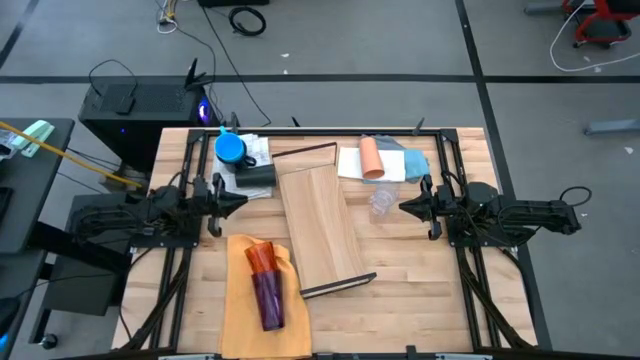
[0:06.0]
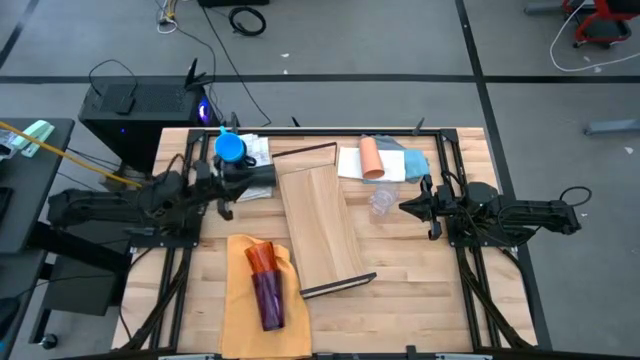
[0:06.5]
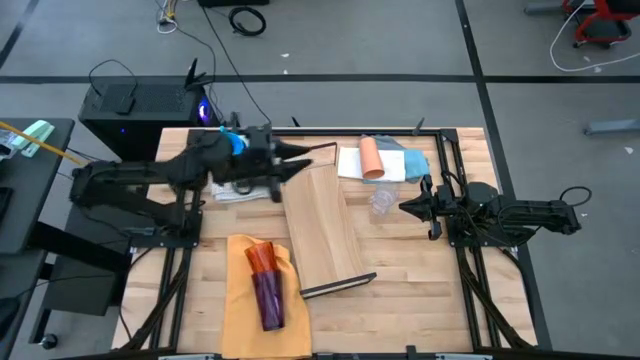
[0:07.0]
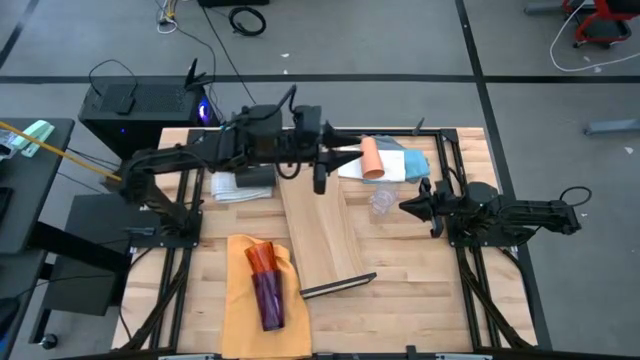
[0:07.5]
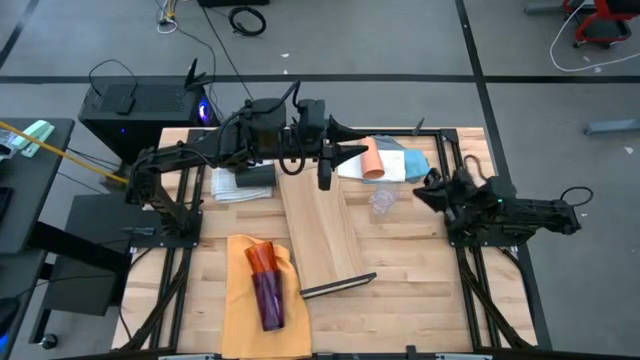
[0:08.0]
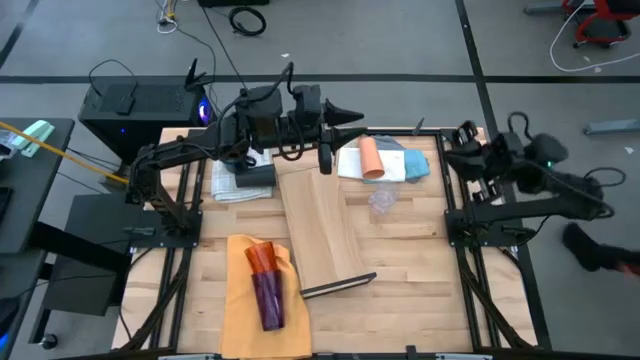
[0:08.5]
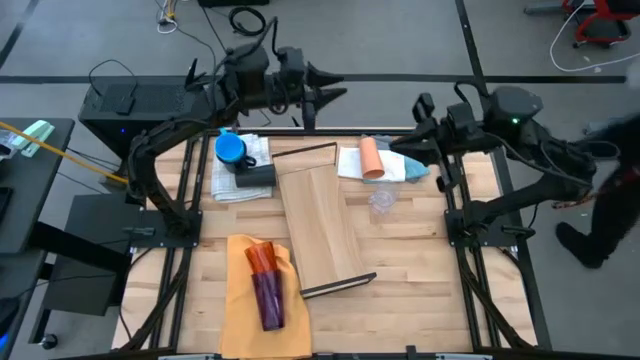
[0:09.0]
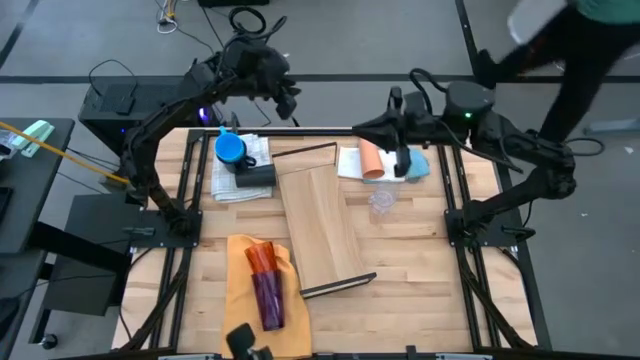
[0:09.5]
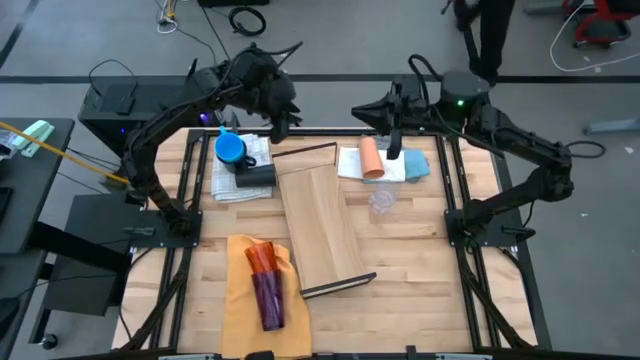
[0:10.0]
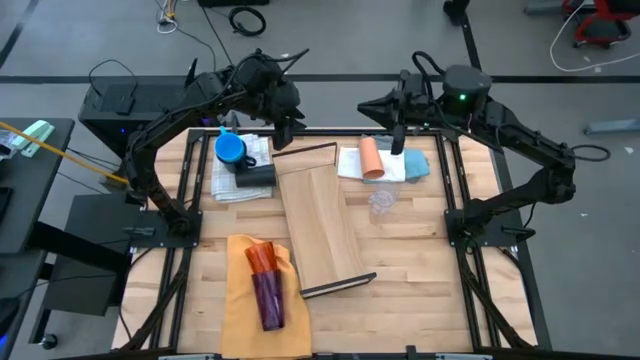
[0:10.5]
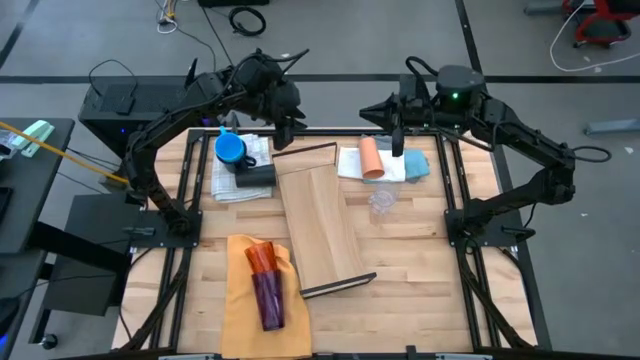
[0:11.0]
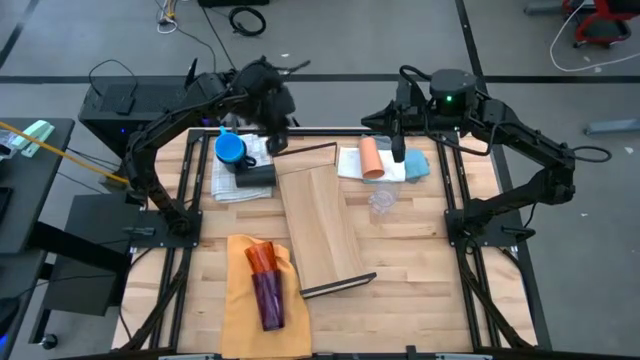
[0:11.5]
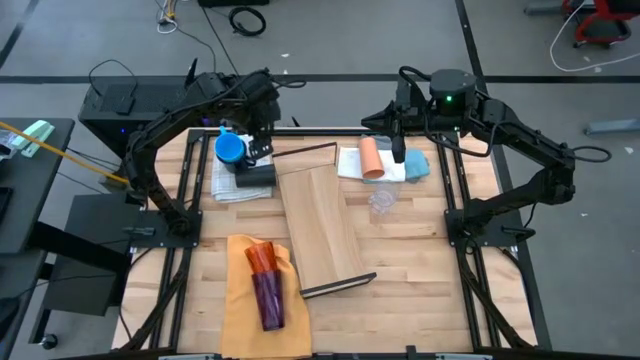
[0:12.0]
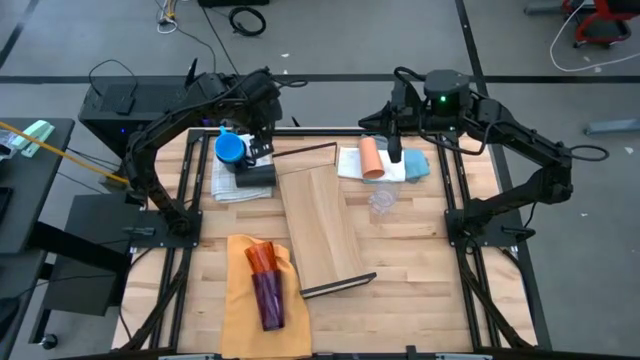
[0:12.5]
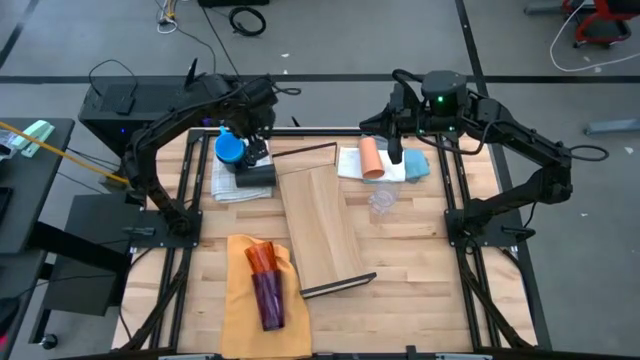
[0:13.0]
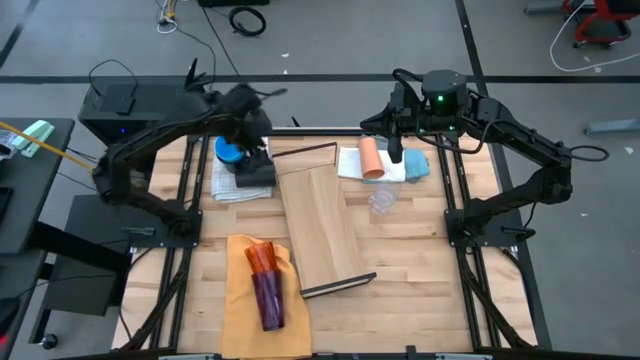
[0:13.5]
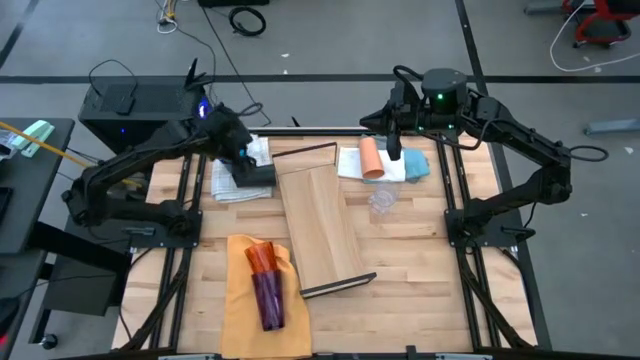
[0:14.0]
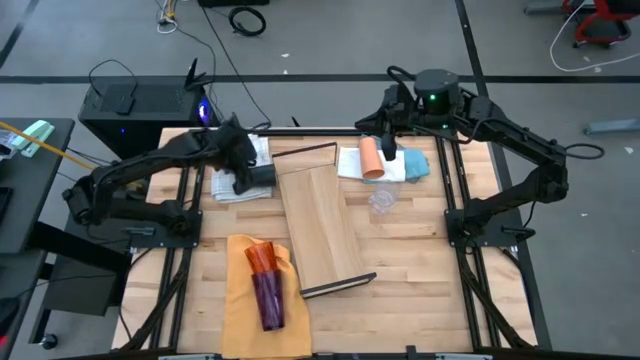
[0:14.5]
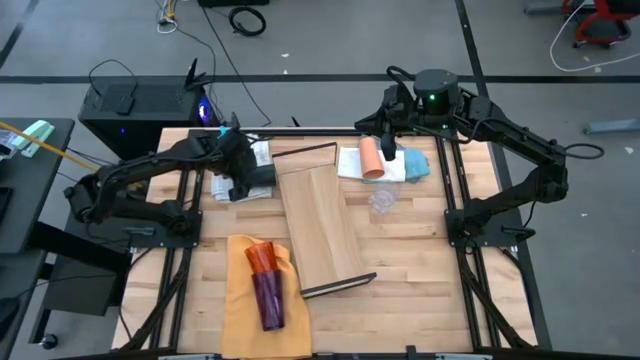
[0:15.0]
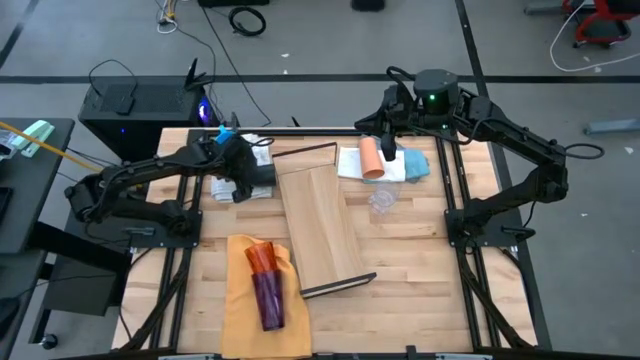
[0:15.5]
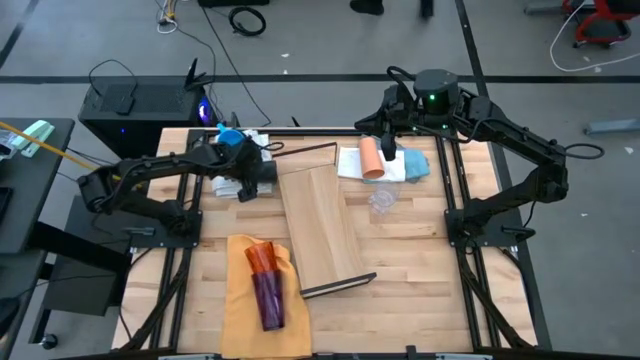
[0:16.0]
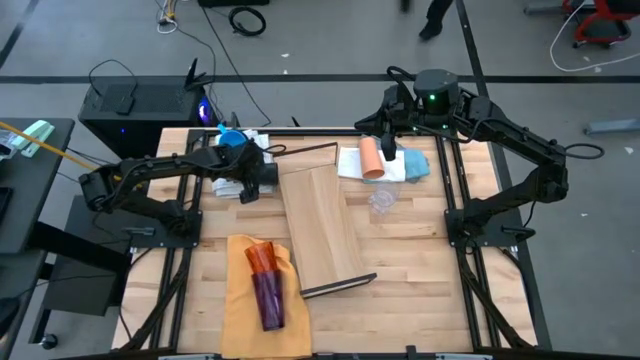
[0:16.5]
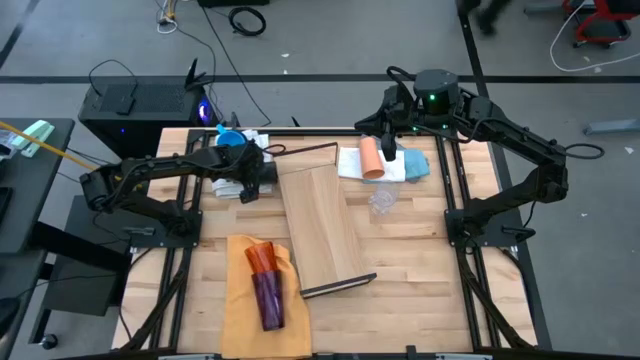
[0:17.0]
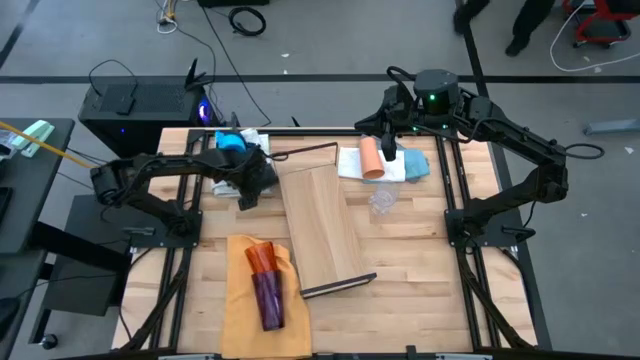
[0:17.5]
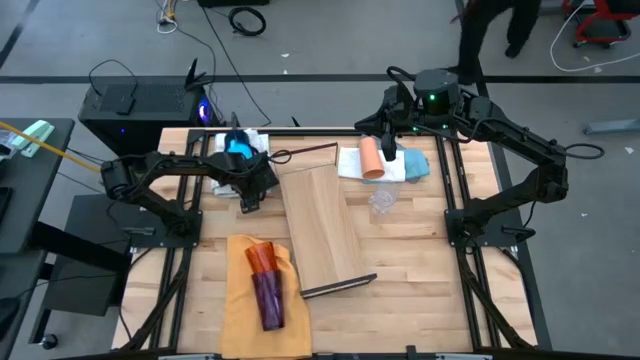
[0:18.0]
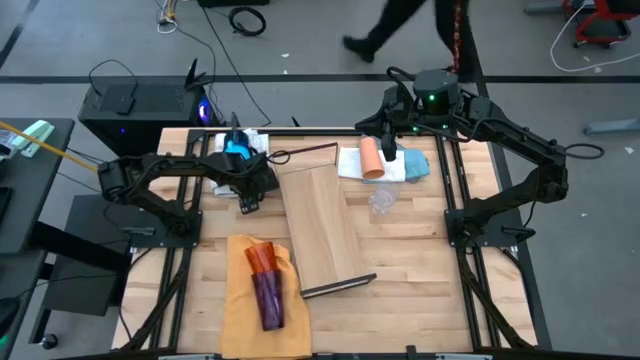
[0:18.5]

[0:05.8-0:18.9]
Task: Stack small to large cups/mugs on shelf
Put the black cup on the shelf

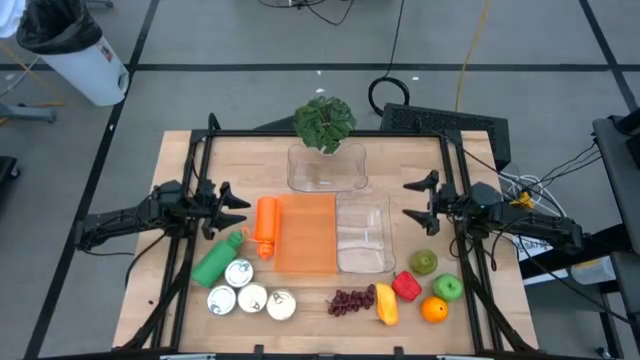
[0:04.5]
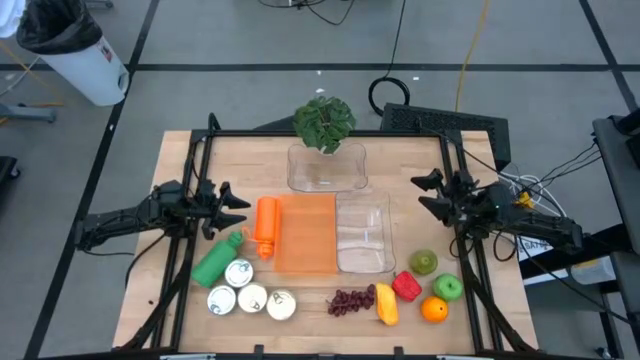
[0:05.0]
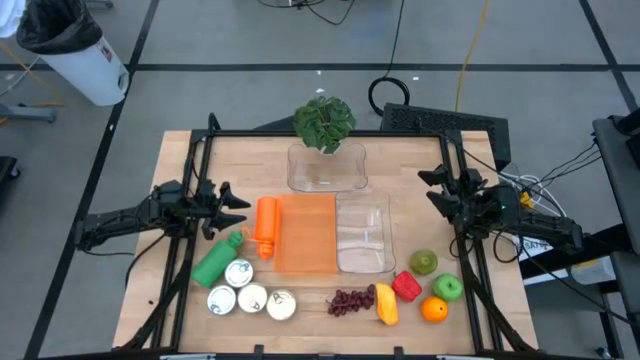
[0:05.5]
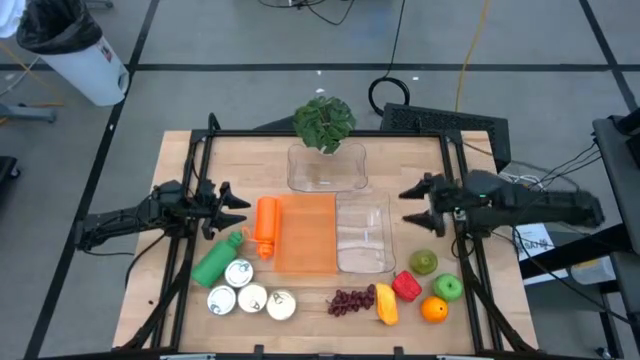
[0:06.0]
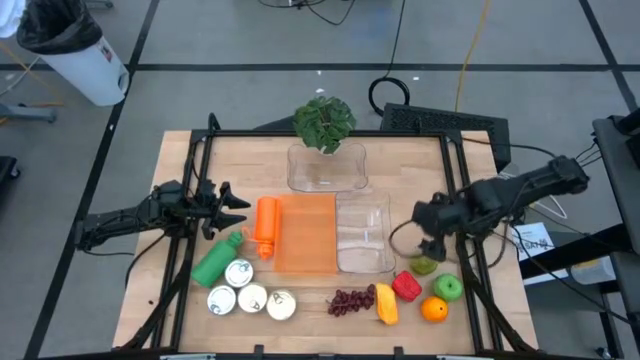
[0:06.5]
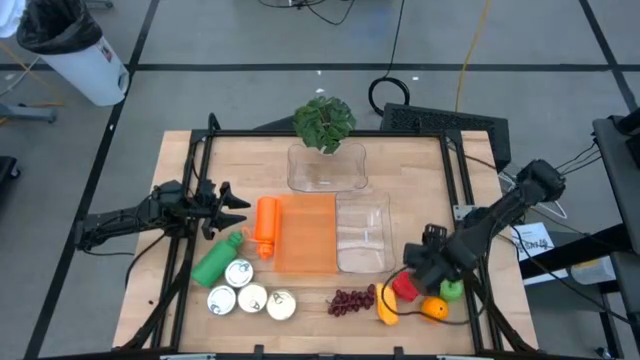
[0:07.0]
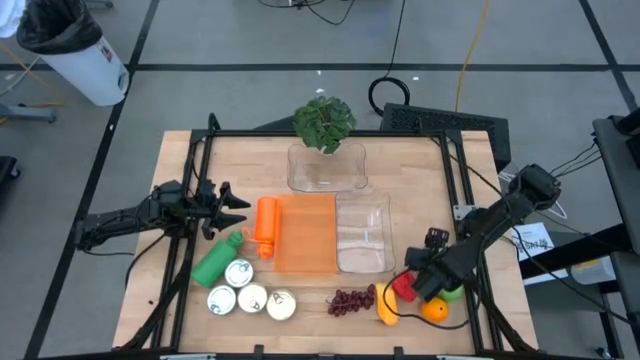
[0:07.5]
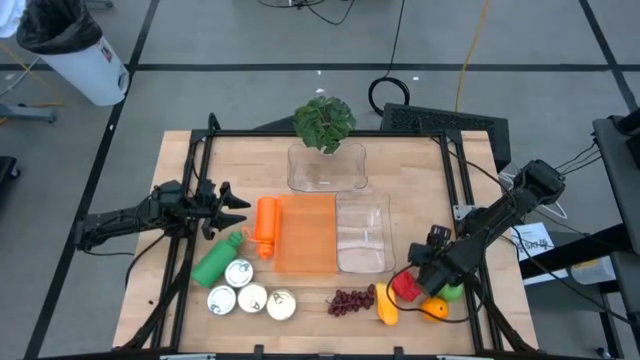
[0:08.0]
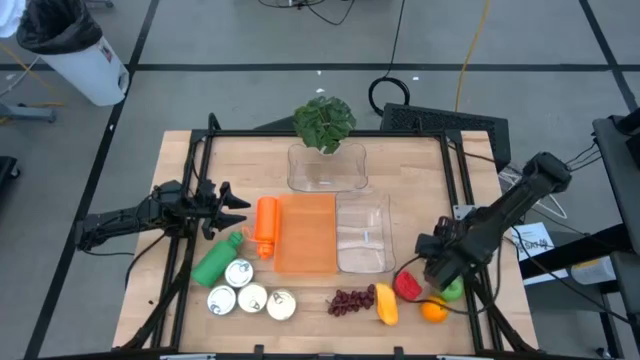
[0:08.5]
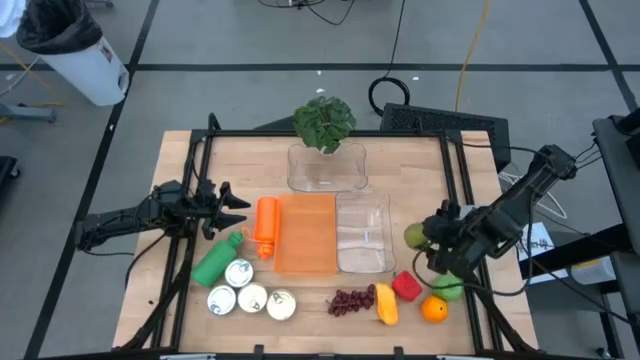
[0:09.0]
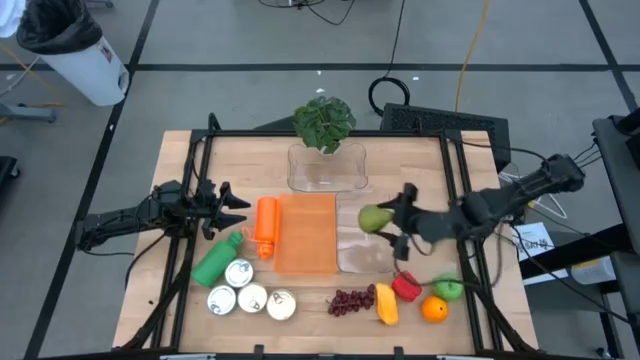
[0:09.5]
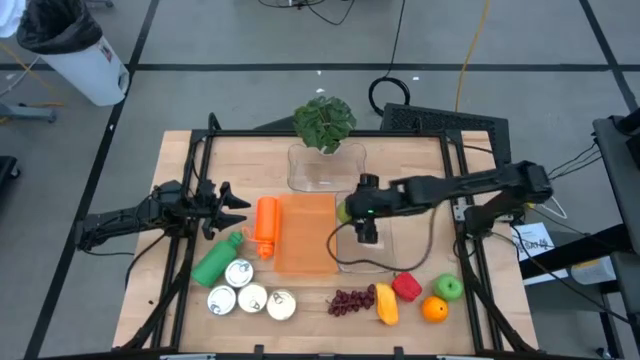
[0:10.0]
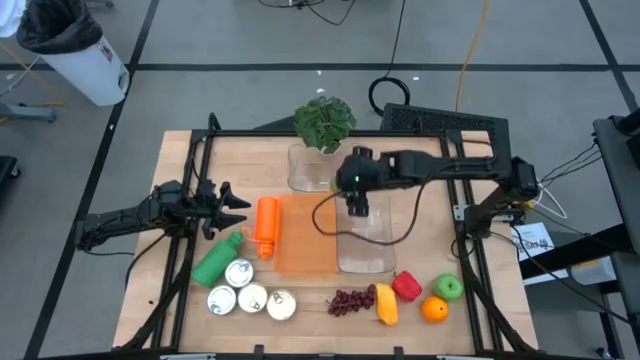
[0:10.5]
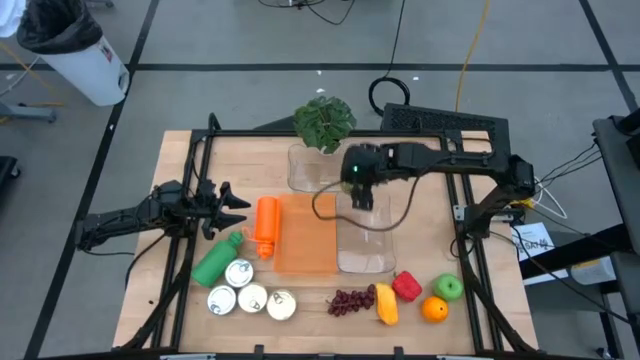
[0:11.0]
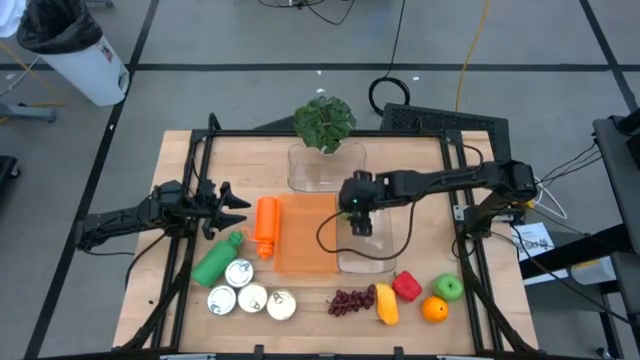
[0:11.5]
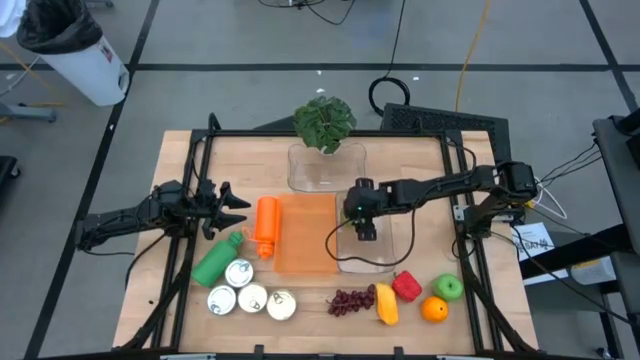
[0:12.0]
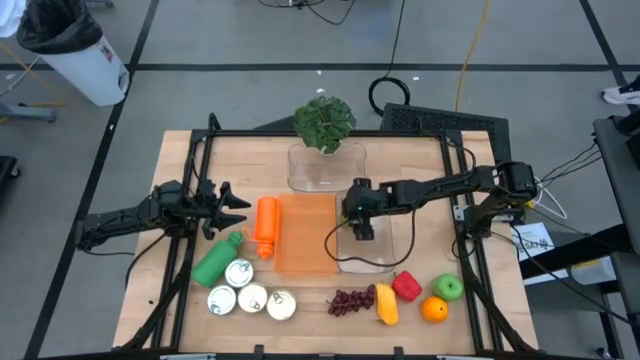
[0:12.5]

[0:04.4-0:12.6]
Task: Pick & Place Food Item
Put the green pear into the bottom transparent bin
